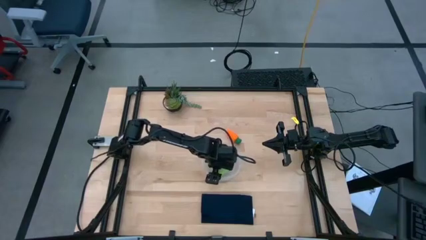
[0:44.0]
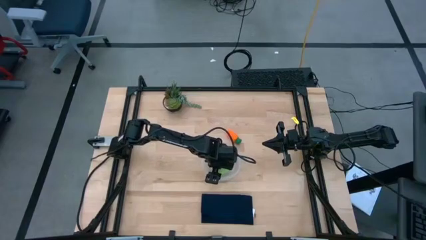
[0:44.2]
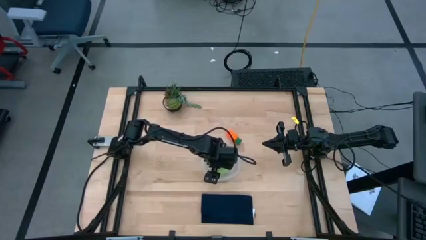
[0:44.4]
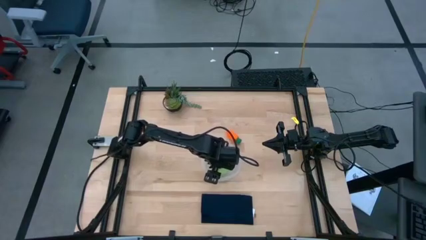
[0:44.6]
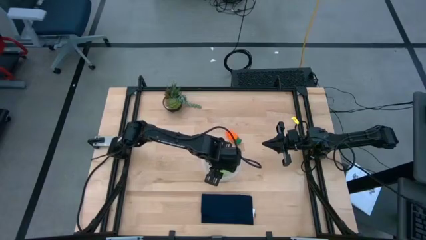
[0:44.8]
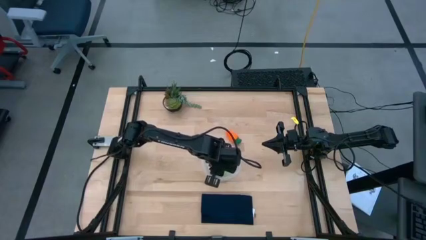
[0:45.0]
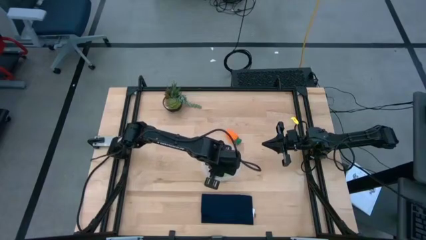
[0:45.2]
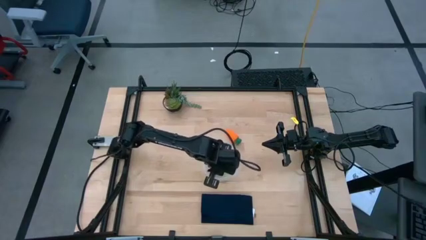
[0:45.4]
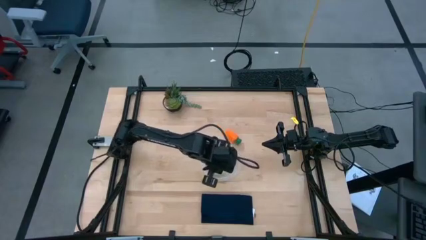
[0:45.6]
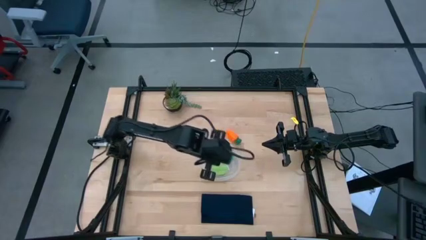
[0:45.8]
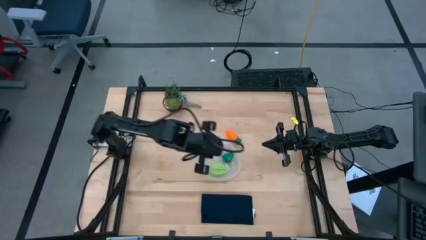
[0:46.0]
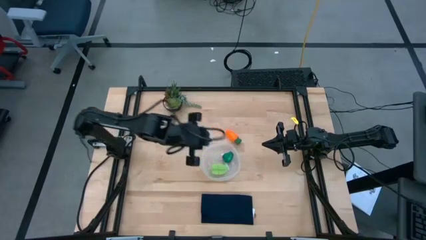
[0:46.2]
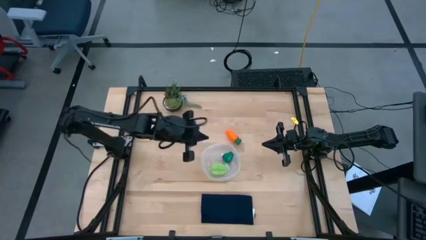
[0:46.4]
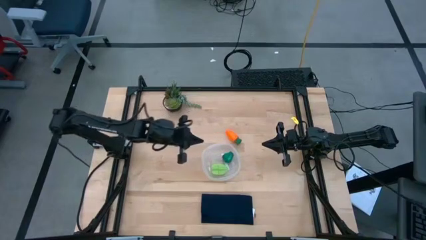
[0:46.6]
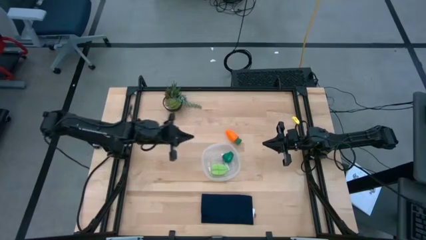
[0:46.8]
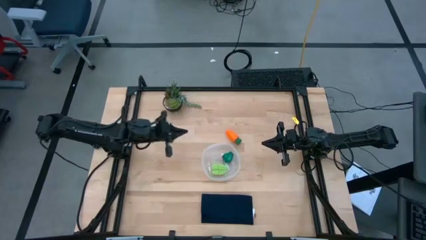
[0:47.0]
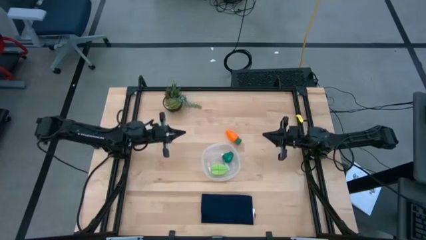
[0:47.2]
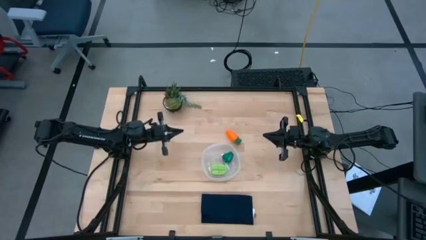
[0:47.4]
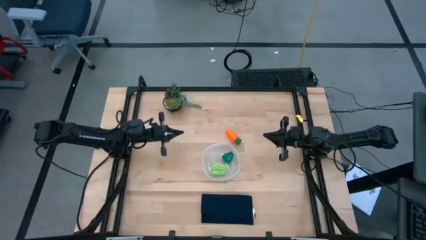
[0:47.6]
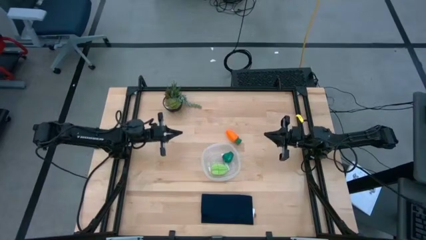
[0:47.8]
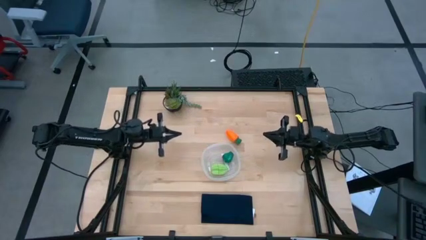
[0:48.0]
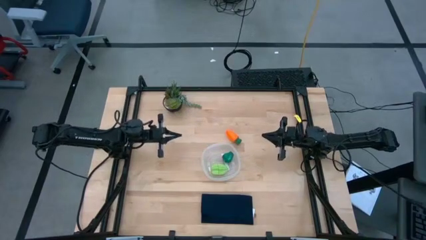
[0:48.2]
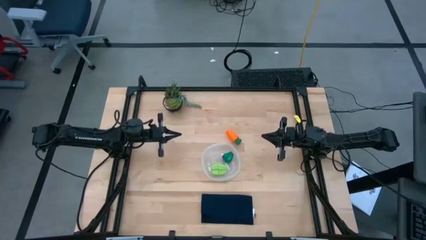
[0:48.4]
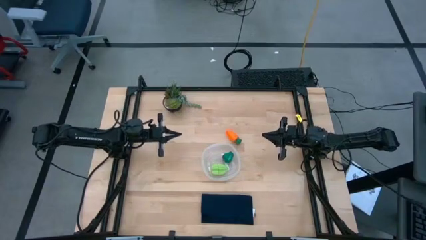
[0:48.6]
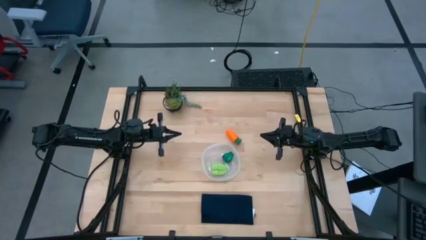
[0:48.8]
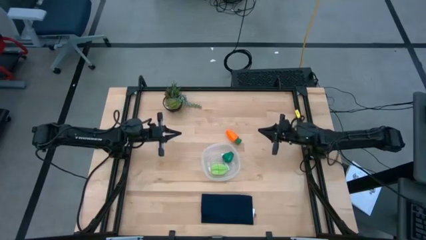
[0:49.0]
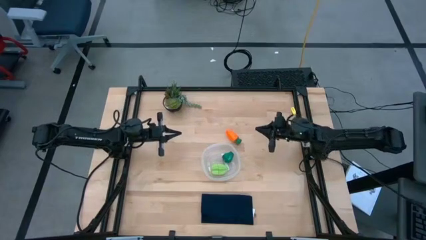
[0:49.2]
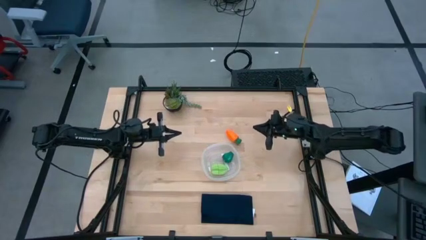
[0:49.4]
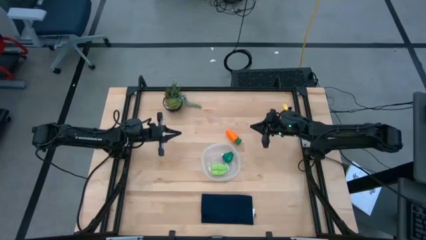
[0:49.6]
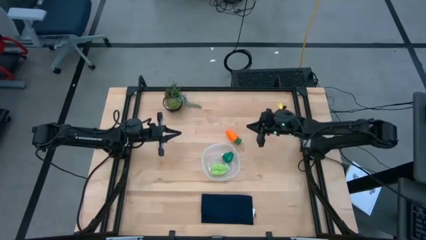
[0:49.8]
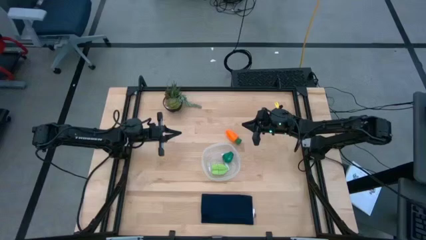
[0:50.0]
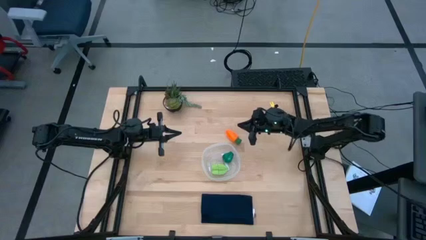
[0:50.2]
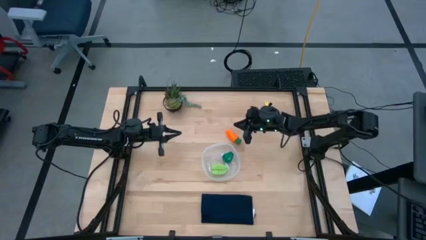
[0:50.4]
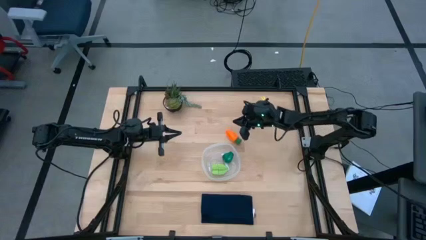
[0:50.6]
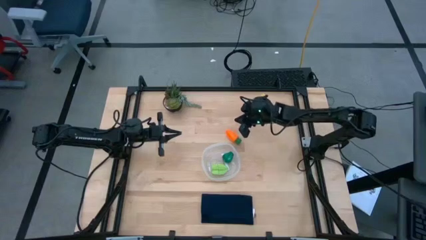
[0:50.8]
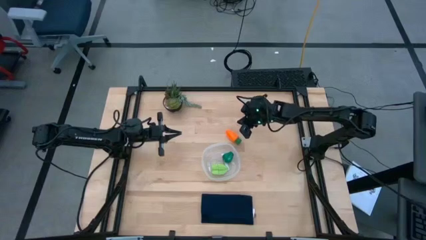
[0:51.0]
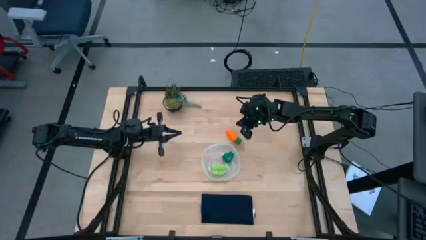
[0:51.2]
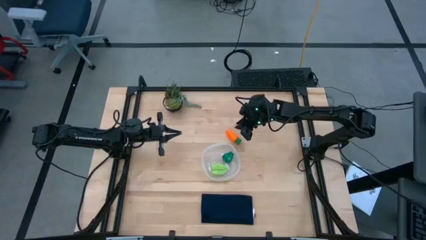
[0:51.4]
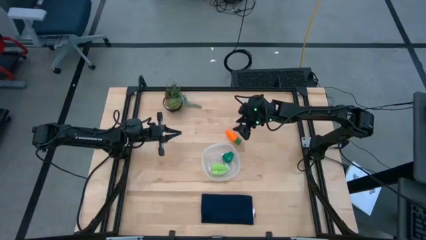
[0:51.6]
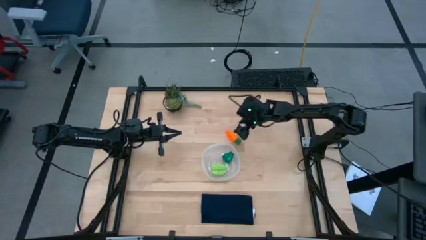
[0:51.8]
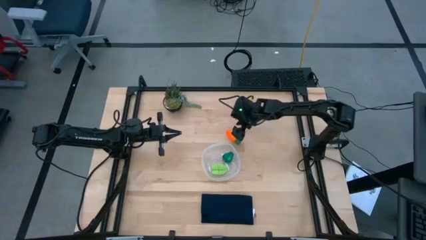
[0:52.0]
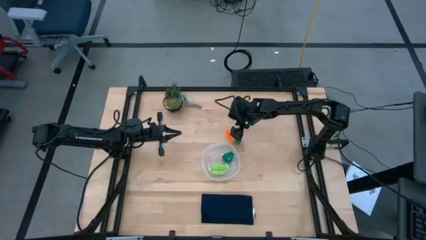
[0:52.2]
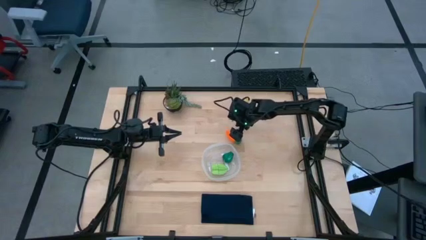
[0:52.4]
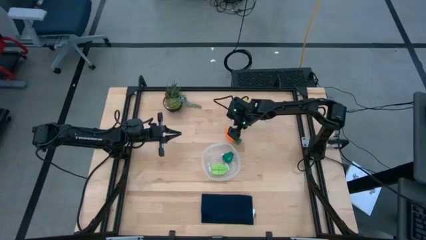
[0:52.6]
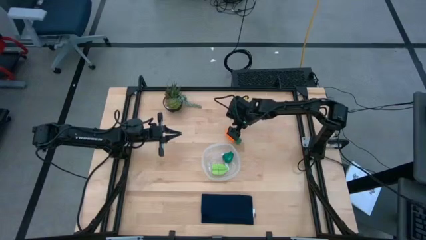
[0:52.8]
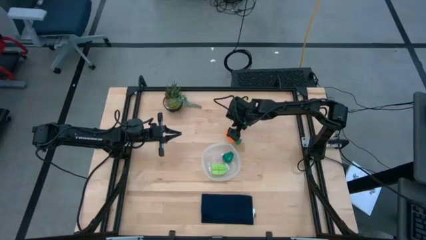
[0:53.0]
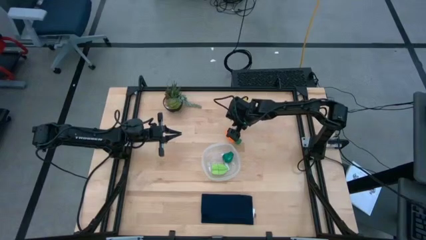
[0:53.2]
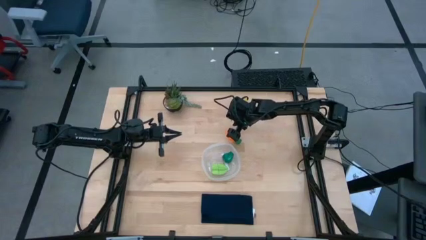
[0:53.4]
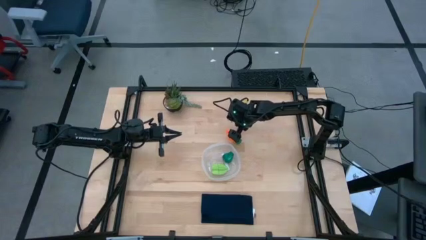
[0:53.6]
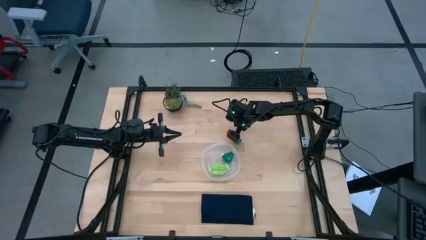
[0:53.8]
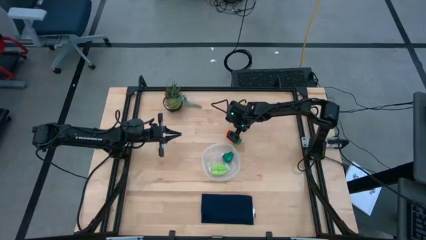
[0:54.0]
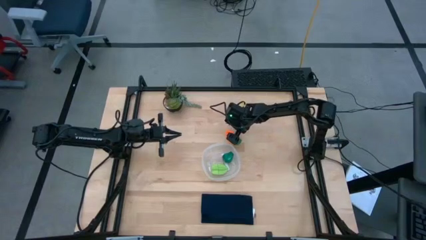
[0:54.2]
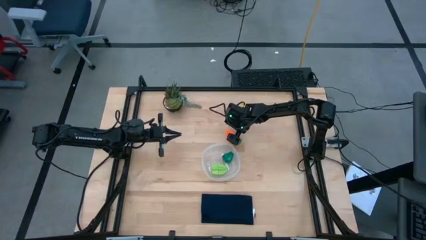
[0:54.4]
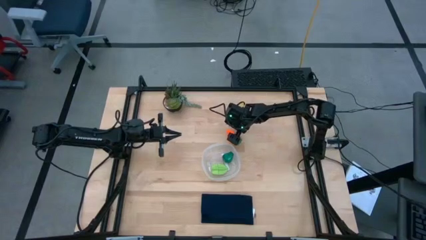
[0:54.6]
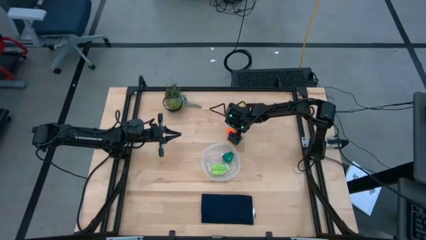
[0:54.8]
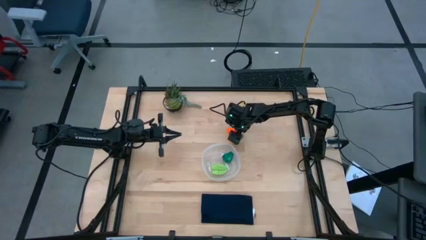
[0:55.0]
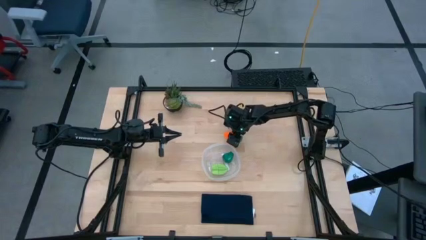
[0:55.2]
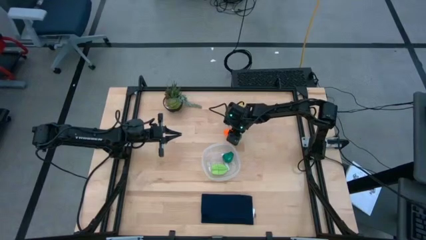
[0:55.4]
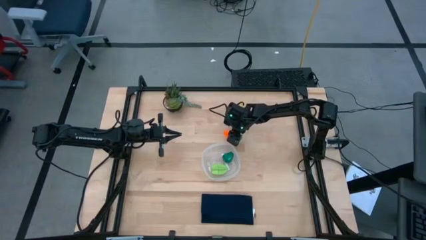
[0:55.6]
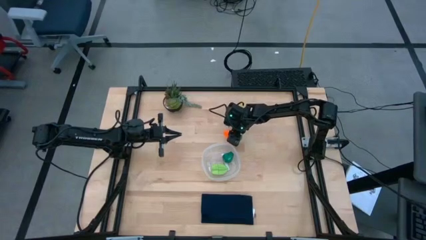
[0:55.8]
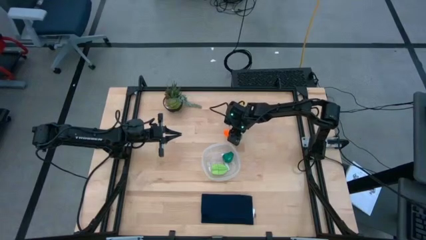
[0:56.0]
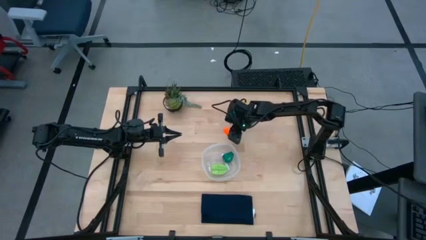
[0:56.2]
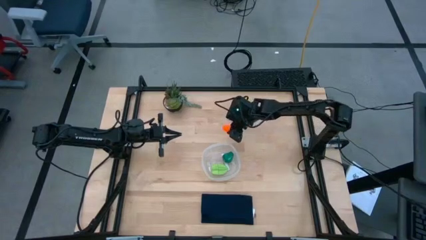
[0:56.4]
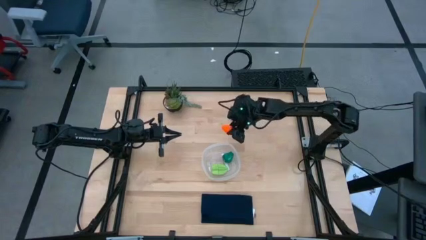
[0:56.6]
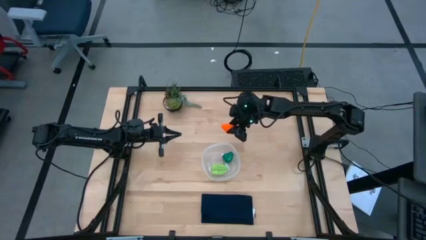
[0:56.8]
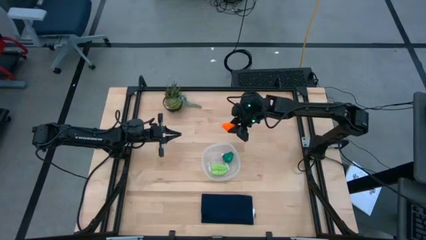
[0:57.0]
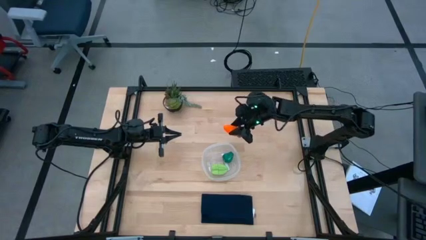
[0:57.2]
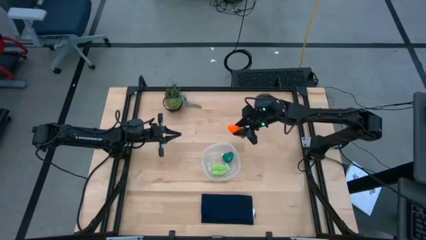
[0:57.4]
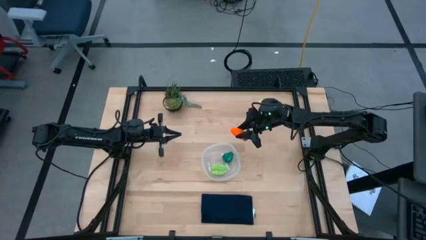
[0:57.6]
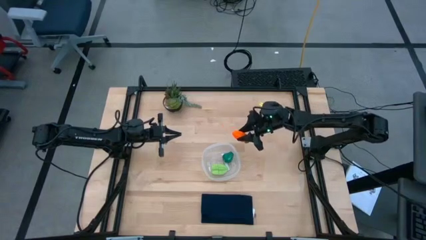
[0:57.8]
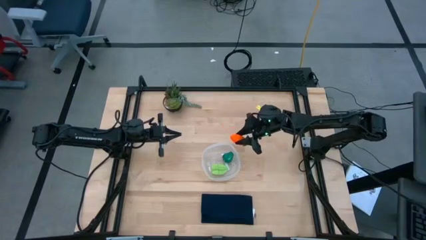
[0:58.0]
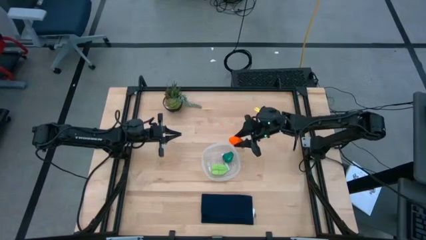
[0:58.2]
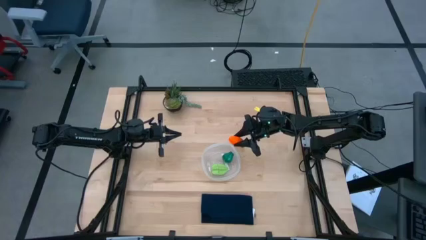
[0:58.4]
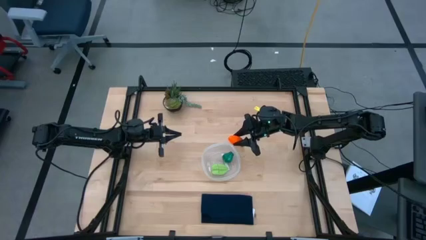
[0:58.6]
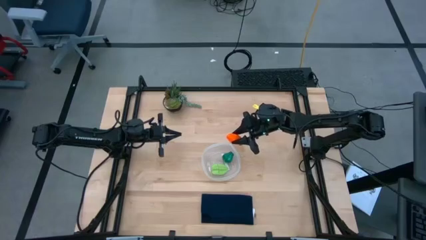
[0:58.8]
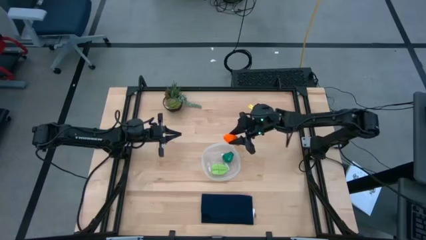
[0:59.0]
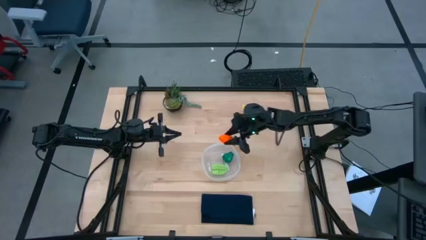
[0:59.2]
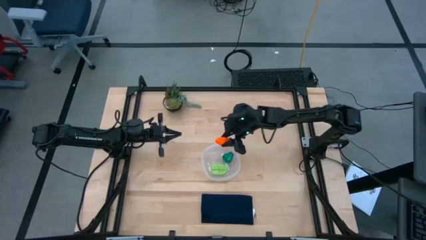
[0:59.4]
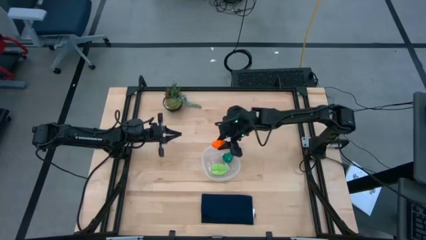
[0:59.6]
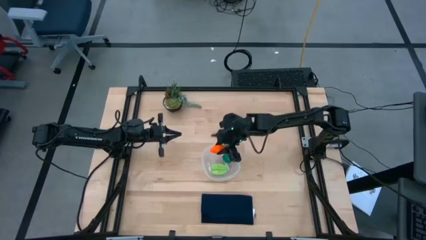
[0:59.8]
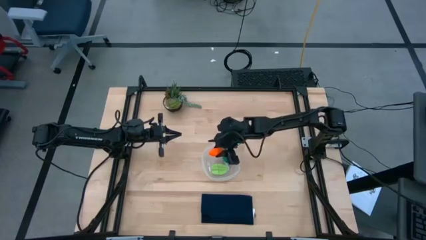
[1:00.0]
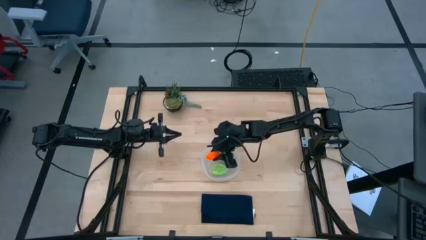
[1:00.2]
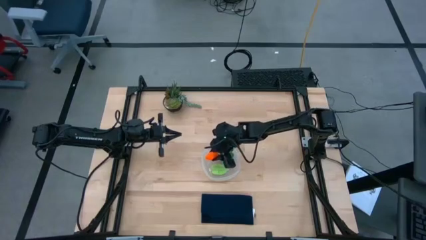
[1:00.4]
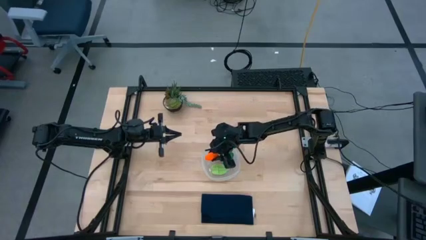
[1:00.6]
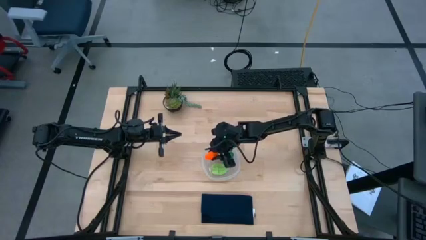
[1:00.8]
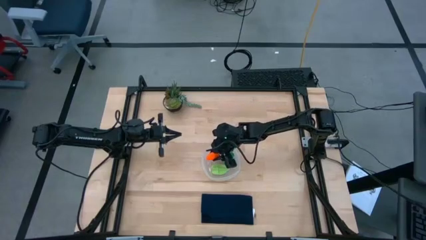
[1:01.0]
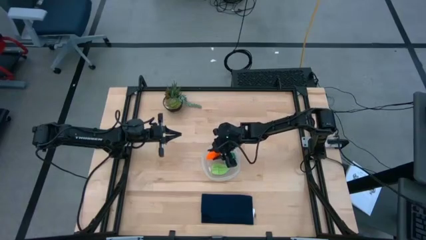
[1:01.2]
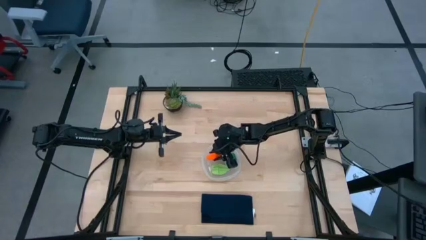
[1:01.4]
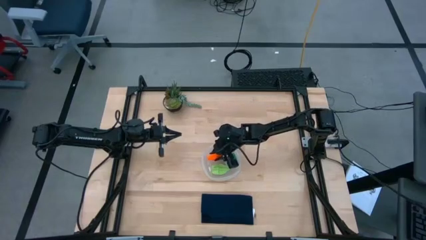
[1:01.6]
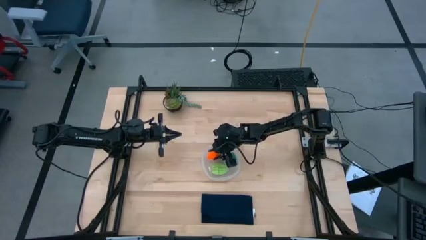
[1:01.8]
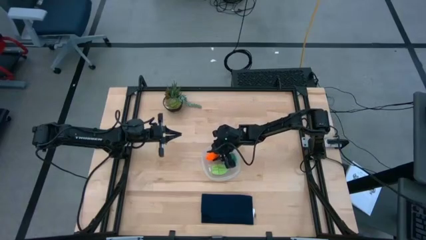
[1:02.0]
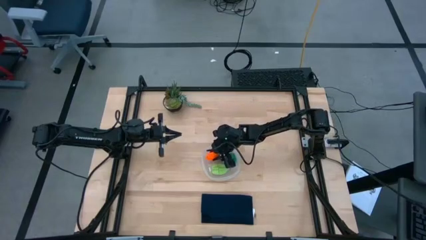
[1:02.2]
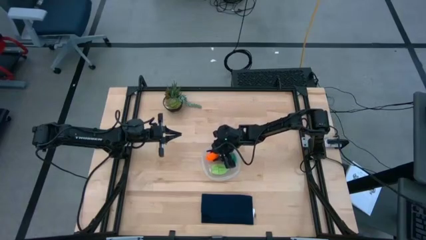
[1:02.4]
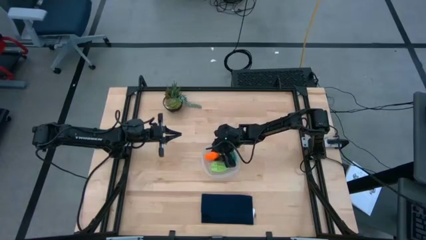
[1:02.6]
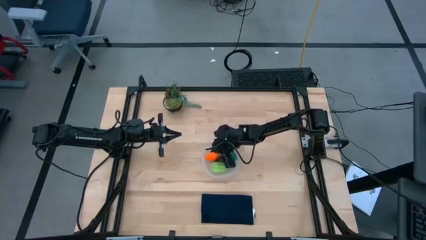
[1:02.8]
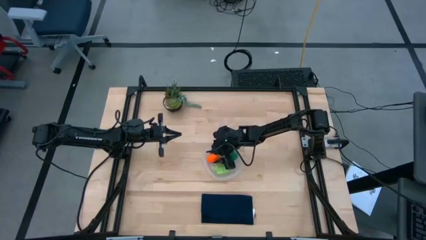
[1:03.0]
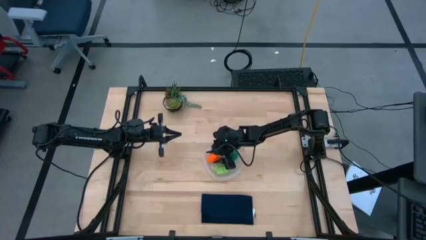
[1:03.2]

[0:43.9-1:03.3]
Task: Pick and placing Produce into tupperware
Put the carrot into the transparent bin
